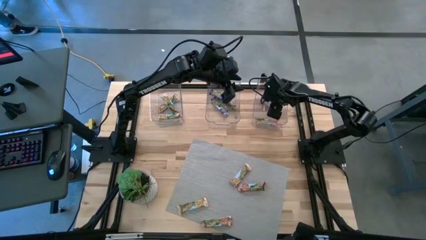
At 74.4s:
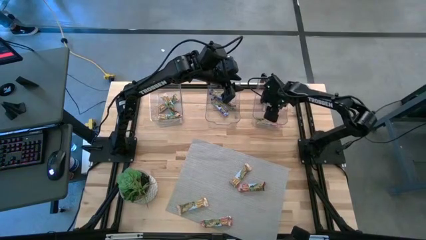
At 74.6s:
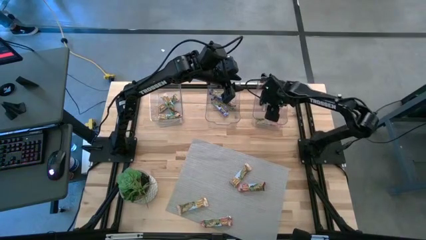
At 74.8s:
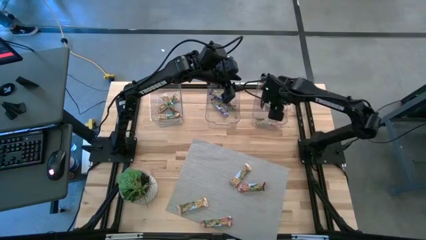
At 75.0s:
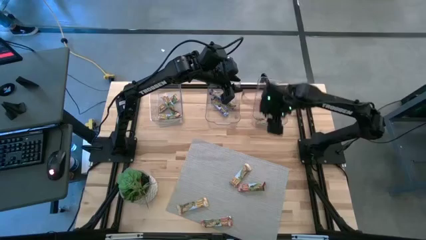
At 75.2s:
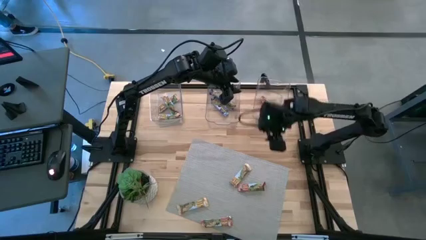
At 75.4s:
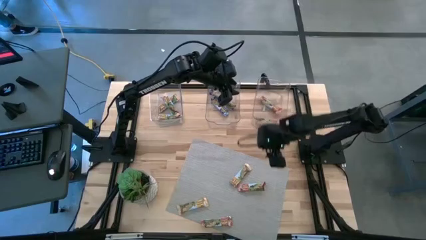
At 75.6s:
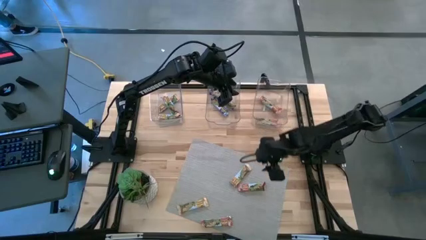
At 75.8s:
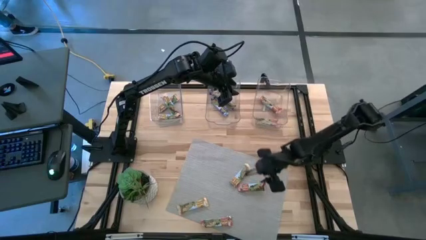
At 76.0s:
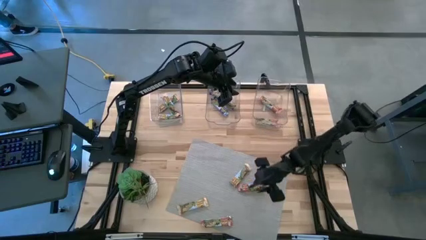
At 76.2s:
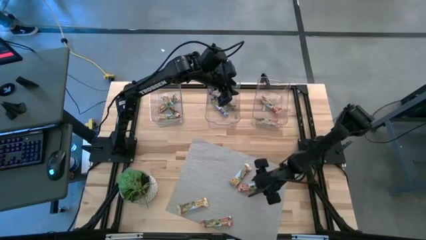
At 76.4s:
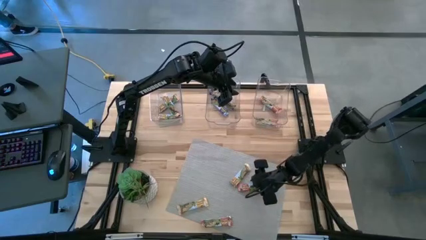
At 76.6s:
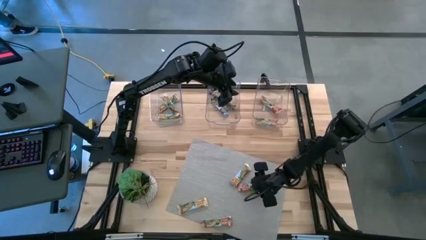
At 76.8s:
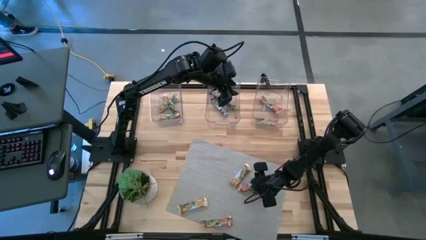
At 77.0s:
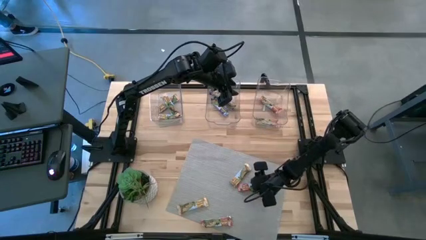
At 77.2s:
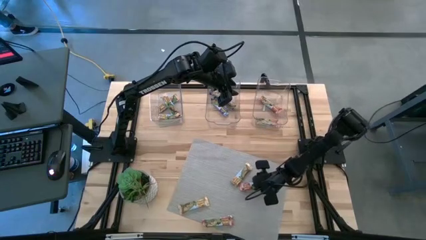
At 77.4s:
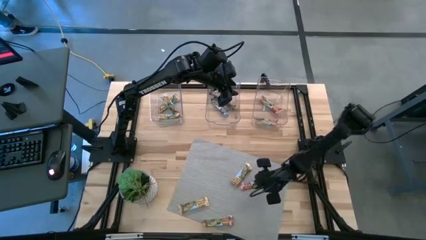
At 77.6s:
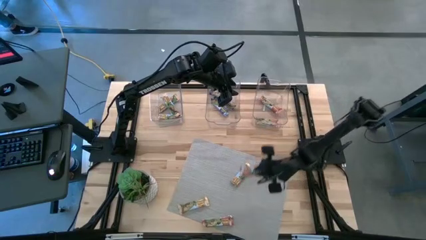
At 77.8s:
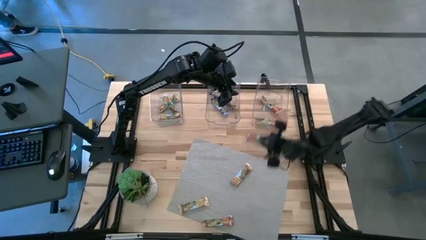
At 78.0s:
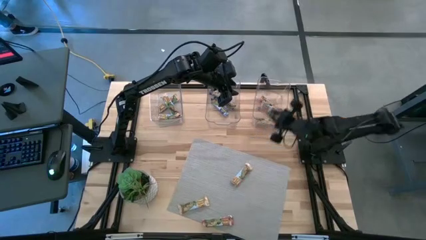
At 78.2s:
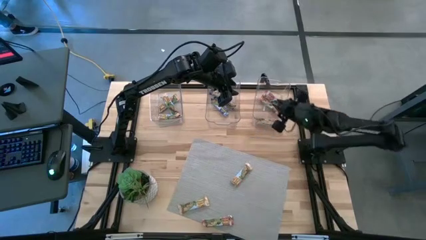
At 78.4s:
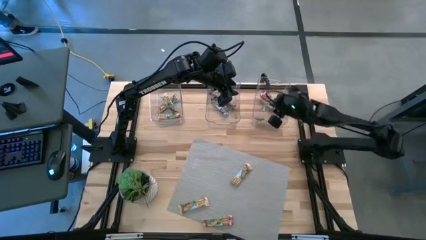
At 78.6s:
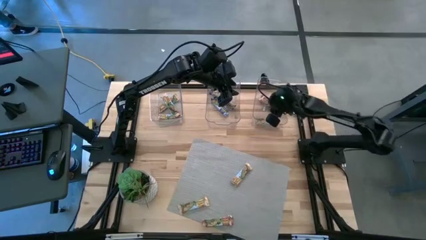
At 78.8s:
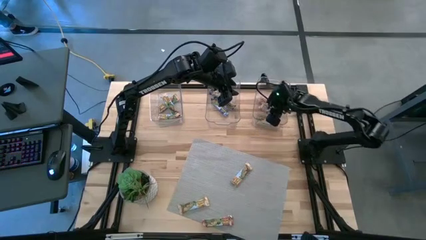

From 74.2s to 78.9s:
Task: Pick and place Granola Bars by type
Put the top red granola bar into the right transparent bin

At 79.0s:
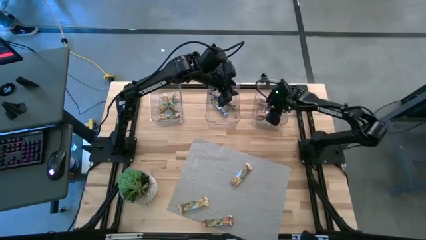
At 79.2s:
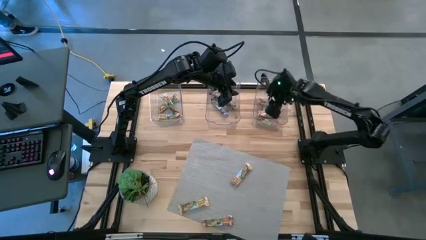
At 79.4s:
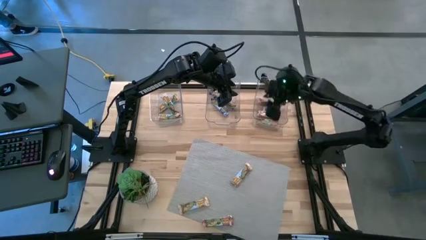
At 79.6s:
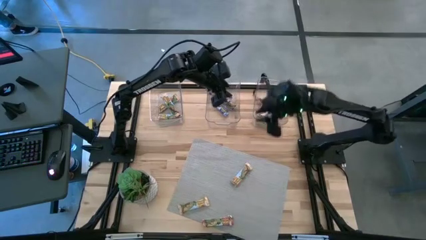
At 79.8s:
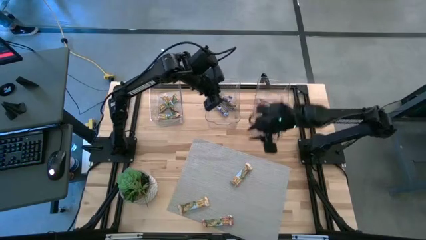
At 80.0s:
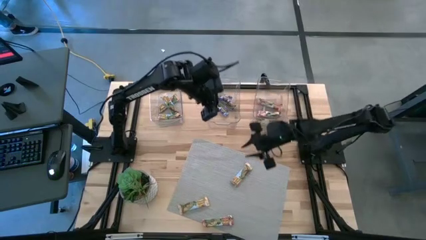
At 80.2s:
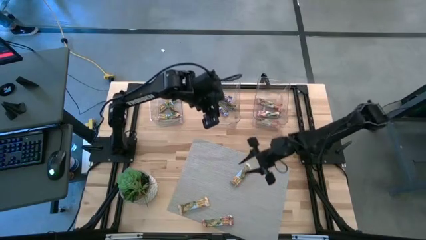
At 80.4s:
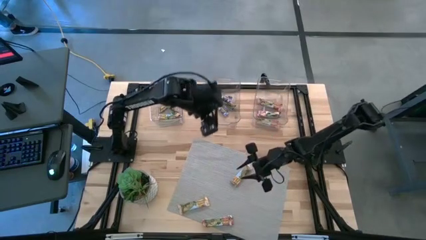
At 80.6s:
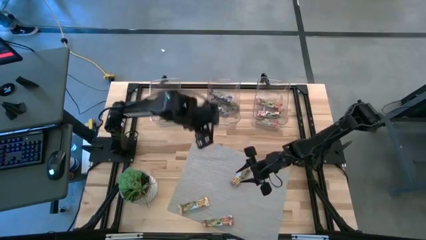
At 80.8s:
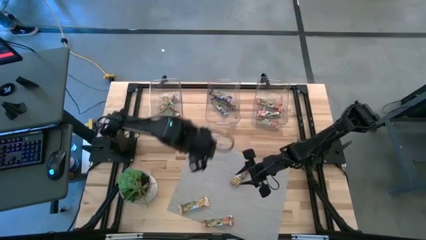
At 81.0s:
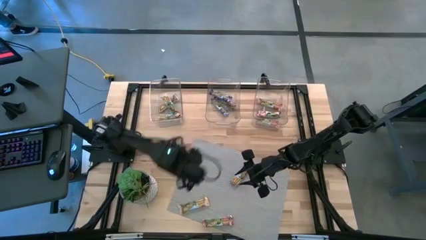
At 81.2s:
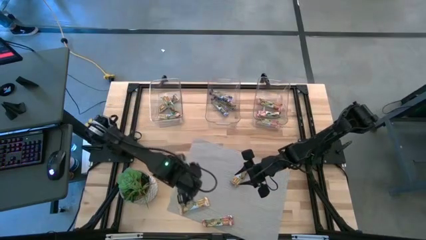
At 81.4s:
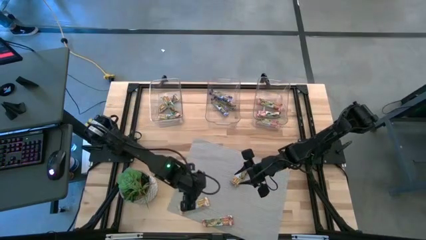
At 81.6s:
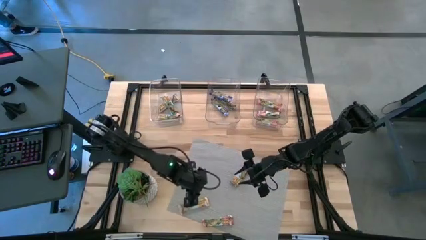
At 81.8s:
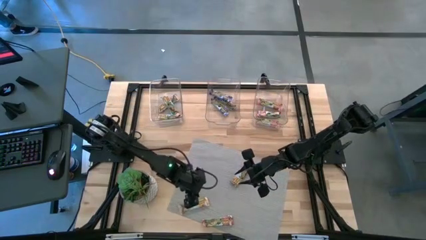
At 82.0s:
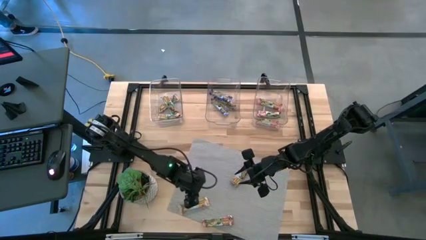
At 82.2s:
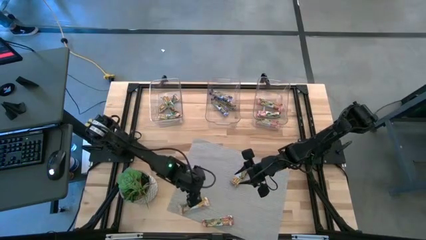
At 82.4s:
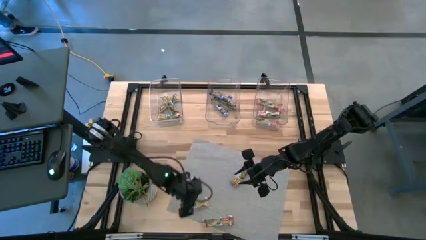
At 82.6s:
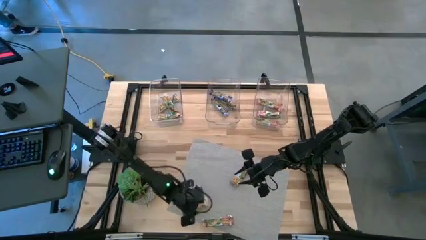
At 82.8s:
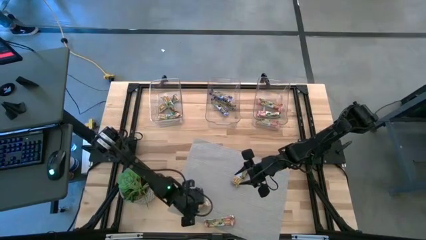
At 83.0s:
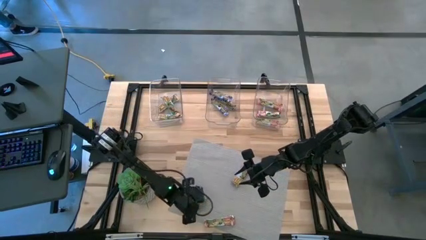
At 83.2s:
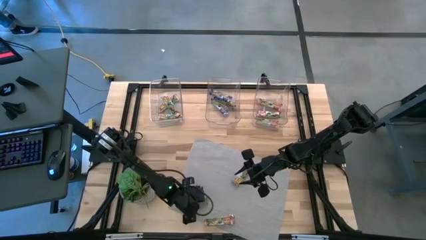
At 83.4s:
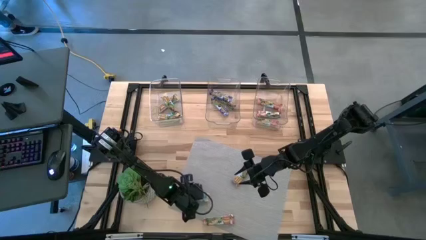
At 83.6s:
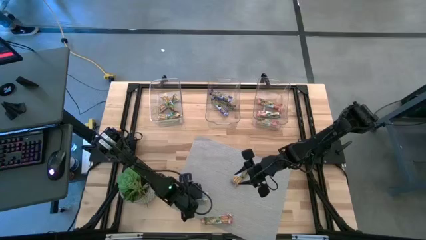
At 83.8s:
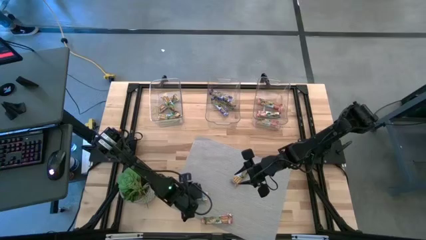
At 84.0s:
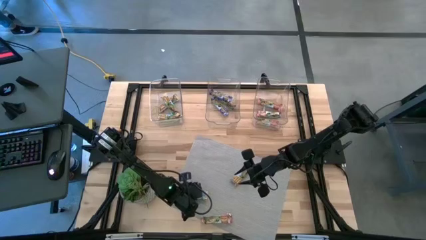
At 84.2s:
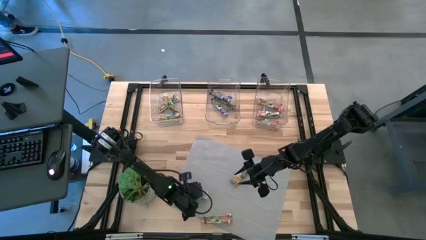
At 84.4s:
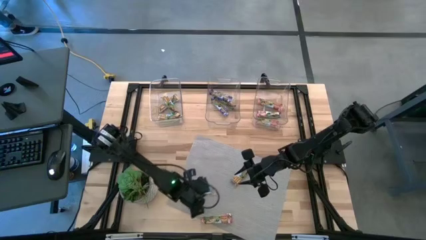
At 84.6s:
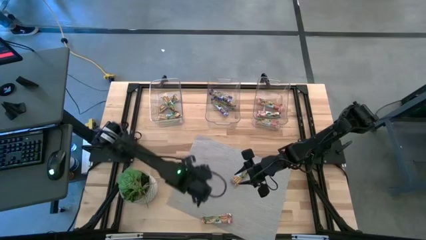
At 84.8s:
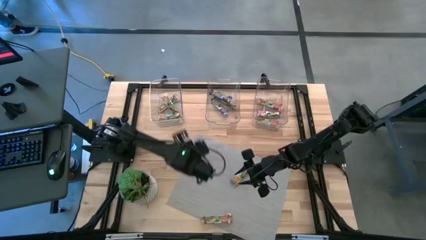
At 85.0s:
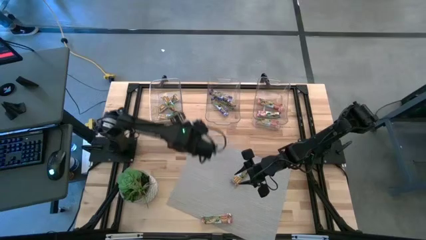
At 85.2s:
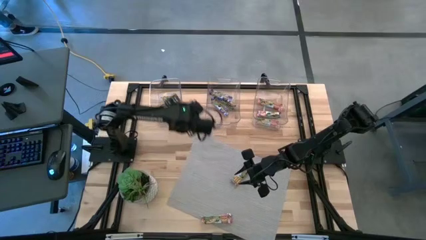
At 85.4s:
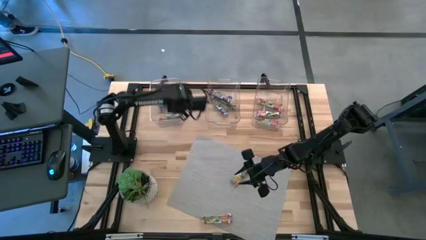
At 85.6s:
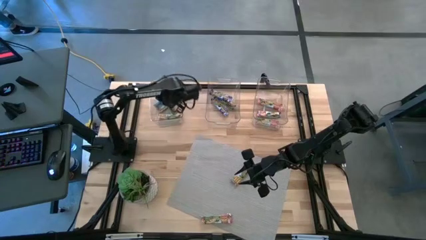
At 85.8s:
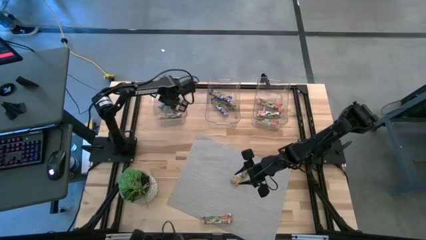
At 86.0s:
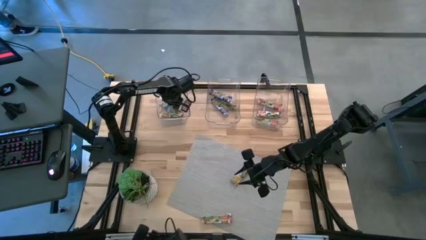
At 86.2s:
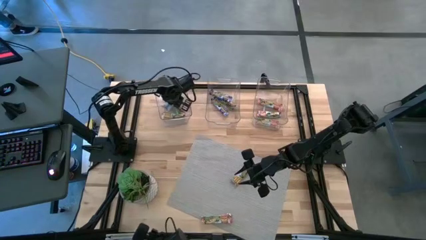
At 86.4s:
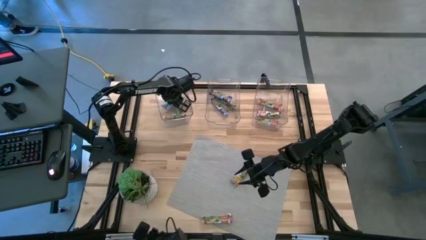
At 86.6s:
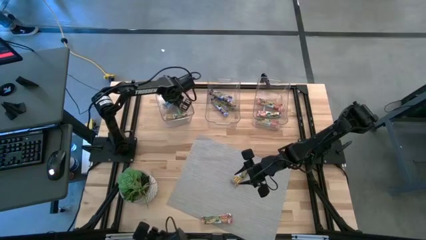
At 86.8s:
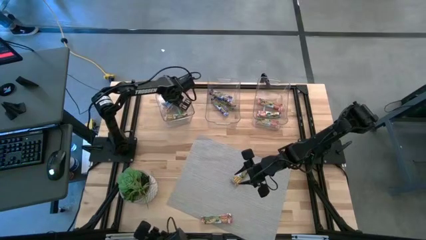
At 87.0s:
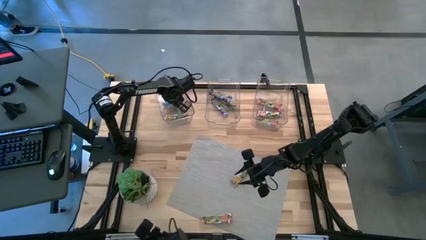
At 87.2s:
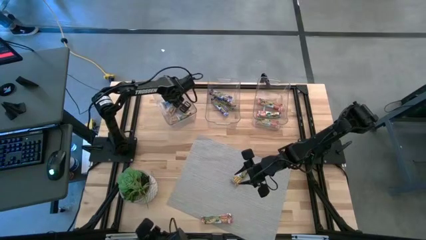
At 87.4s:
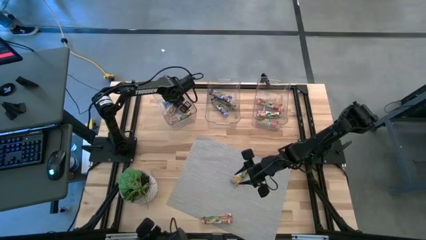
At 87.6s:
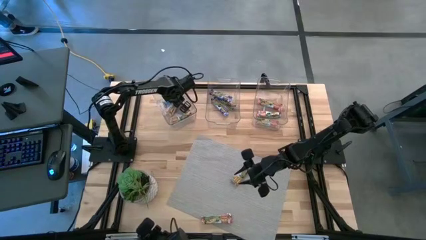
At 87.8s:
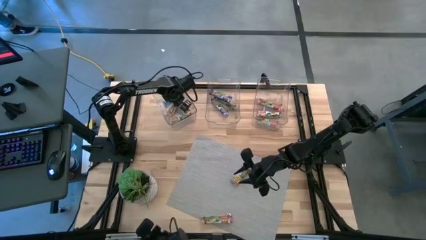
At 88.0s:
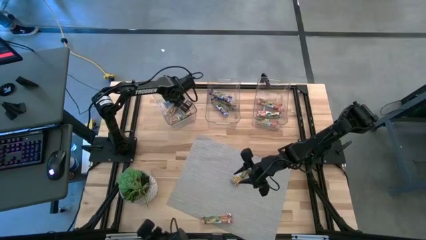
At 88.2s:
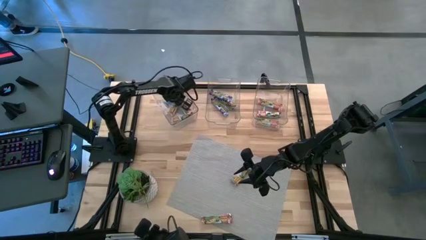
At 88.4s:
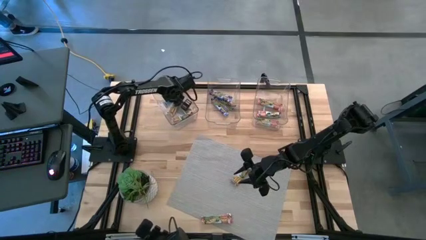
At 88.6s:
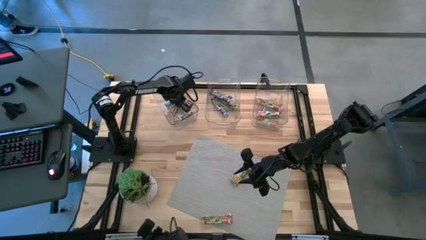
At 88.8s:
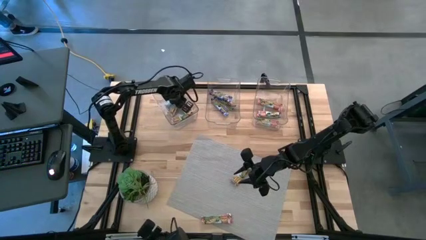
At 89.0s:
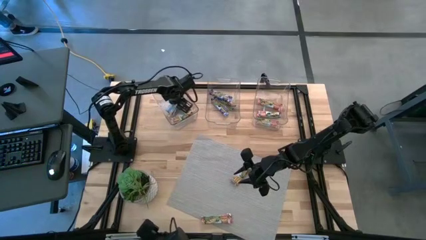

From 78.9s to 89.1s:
Put the bottom yellow granola bar into the left transparent bin

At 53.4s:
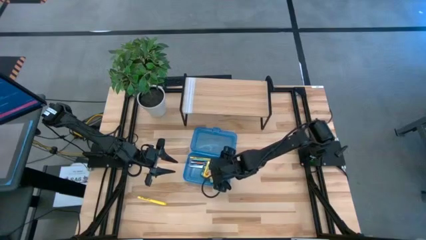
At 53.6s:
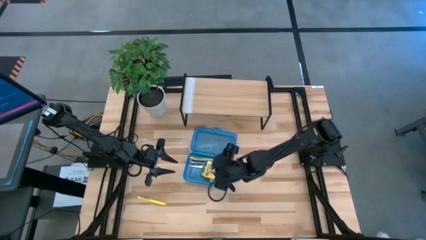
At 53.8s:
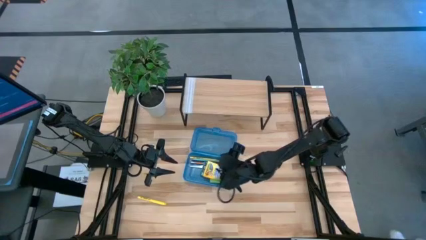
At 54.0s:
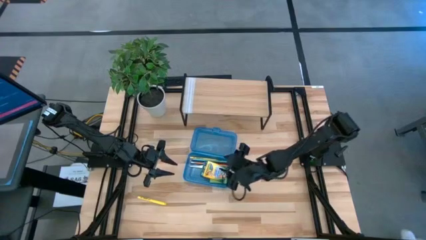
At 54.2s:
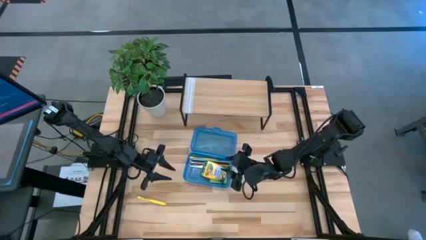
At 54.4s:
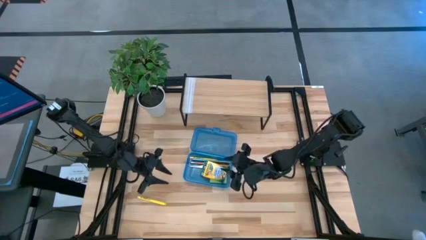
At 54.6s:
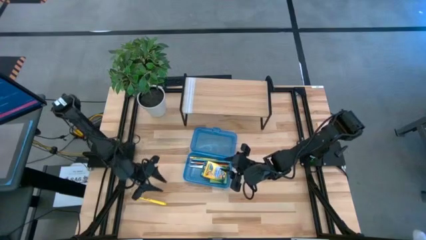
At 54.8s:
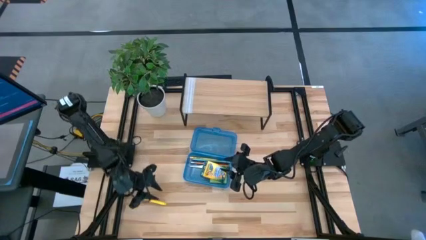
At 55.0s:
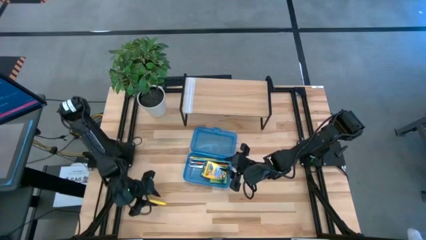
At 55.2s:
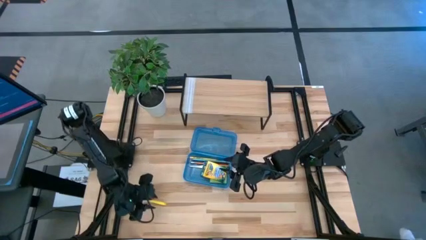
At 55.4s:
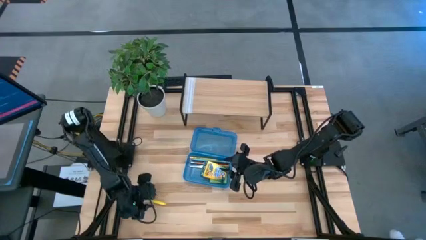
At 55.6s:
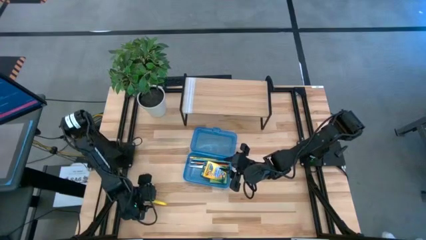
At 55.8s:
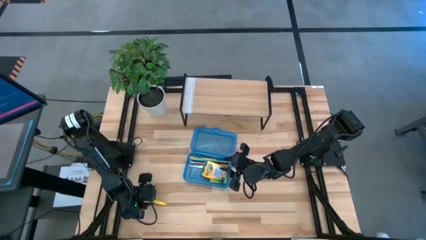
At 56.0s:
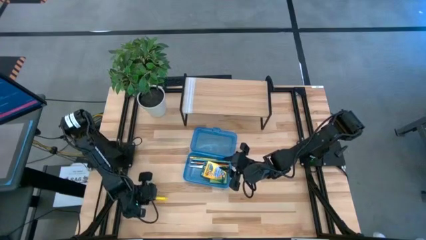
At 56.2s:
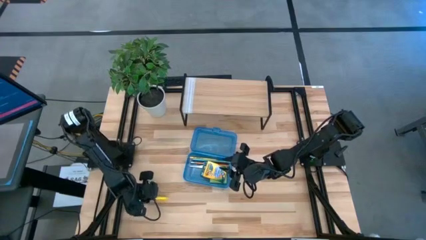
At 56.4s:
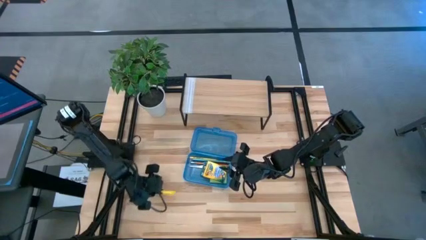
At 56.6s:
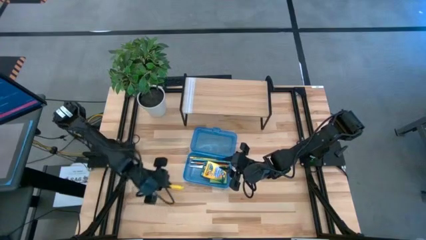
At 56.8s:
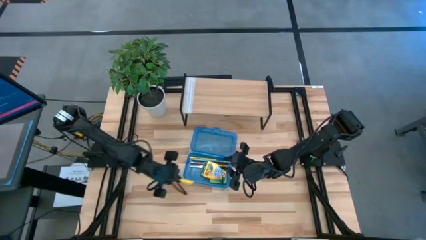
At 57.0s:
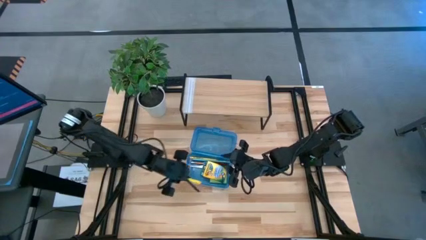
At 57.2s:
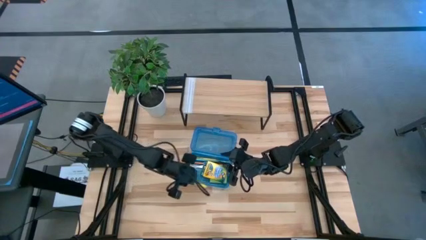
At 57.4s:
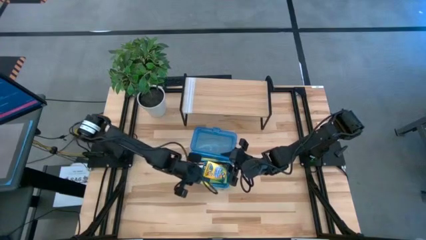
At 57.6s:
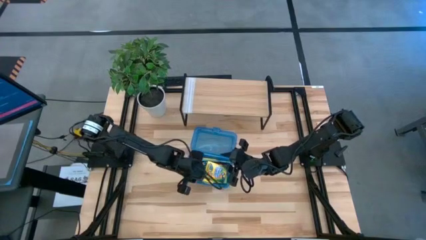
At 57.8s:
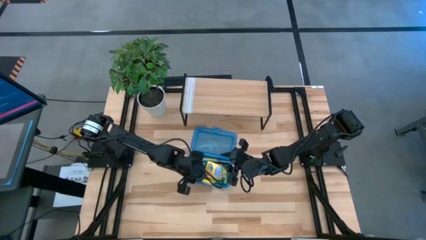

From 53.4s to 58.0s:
Task: Pack school essentials
Put the yellow pen into the blue supply box
